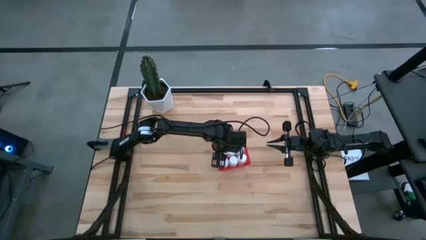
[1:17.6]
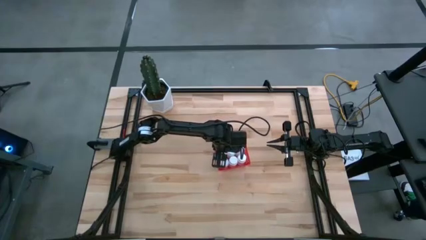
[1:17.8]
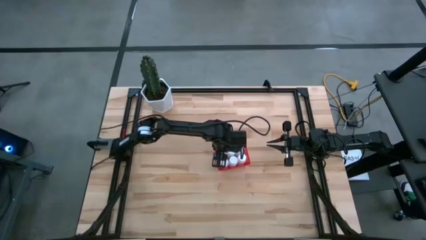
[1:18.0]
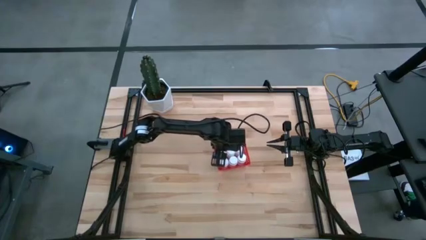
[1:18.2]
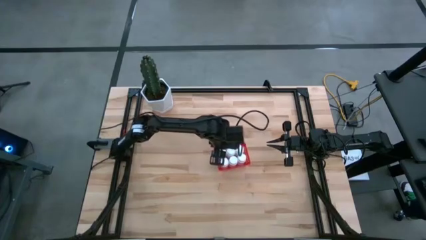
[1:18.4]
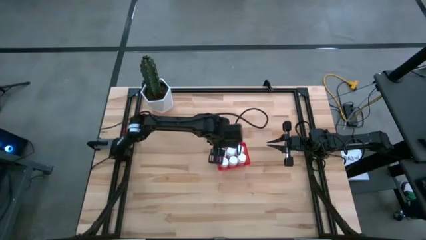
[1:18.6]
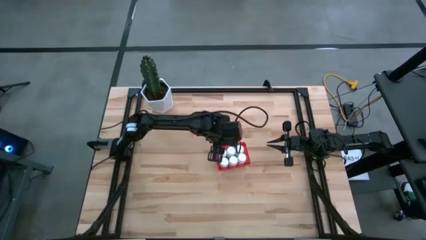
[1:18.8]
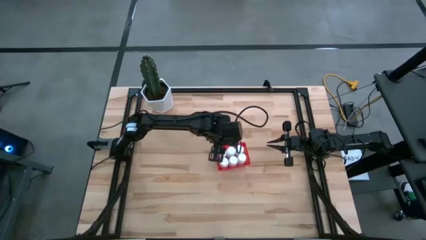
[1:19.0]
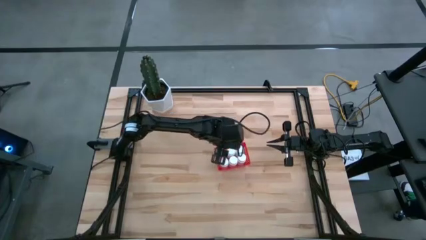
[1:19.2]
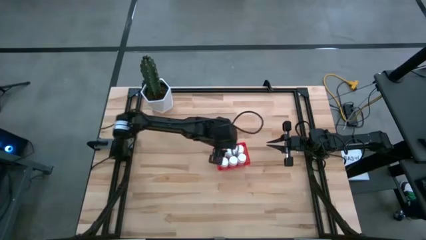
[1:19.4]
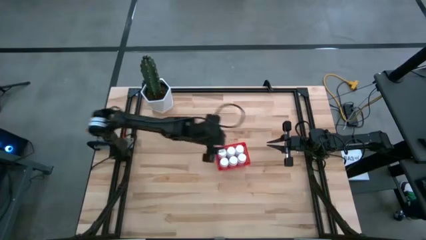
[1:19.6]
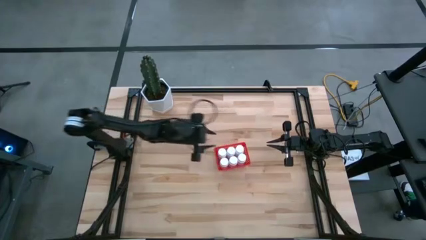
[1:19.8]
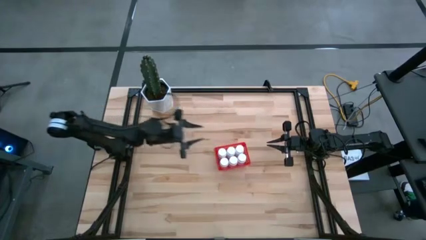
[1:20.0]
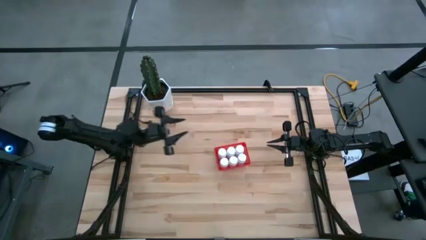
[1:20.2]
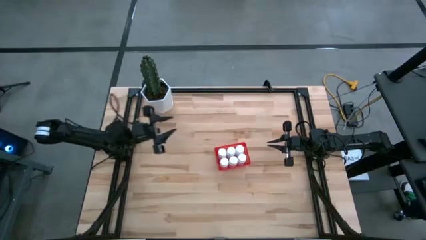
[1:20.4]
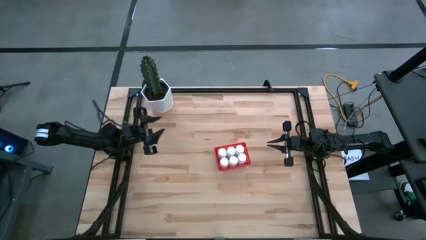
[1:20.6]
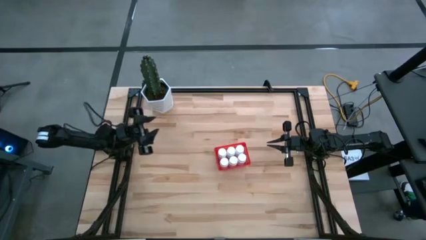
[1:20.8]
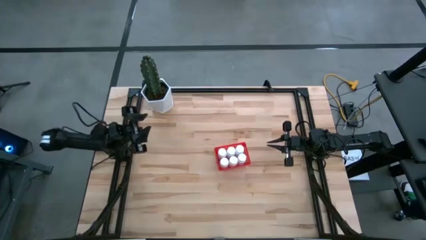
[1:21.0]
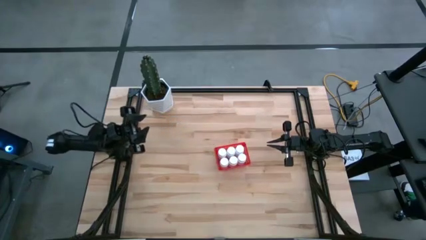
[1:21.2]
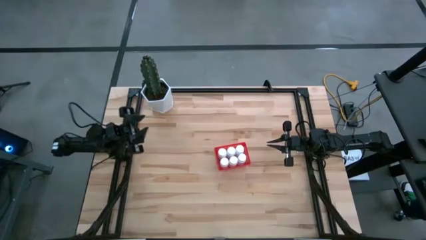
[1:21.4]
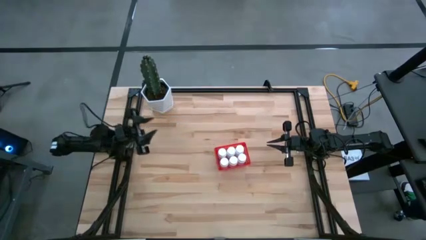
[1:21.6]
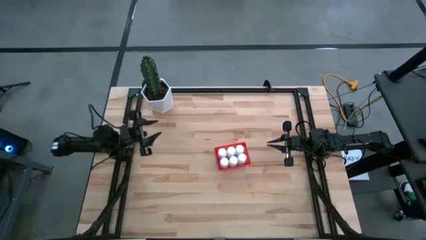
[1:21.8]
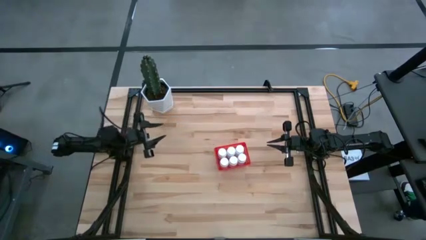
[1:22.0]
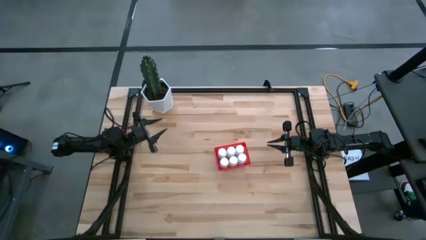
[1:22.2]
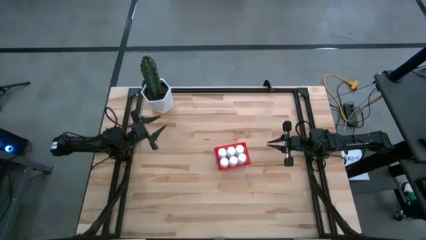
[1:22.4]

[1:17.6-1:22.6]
Task: Pick and place pill bottles into a basket
Return to Home Position

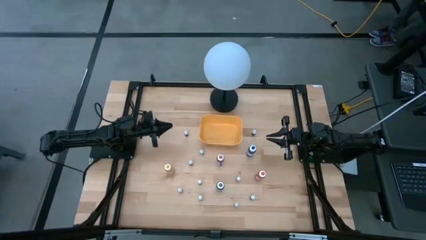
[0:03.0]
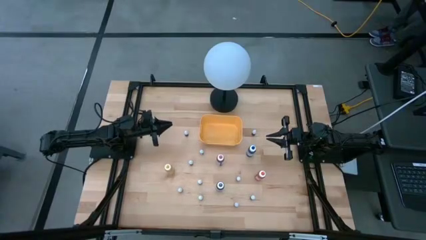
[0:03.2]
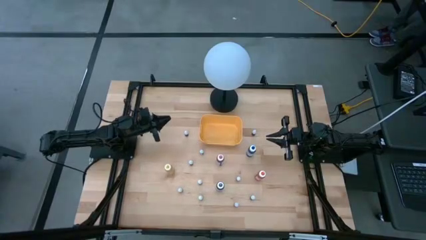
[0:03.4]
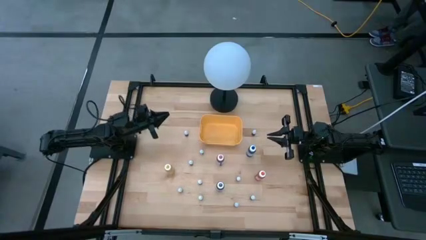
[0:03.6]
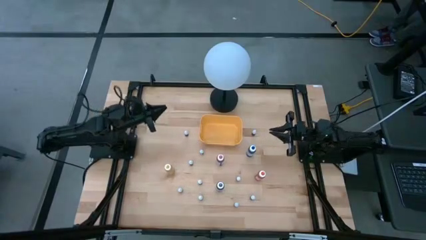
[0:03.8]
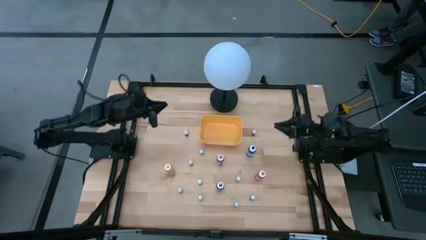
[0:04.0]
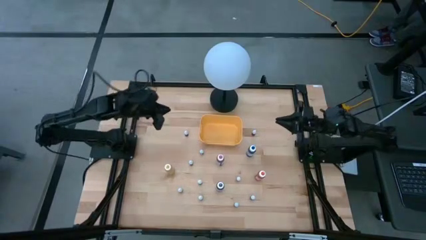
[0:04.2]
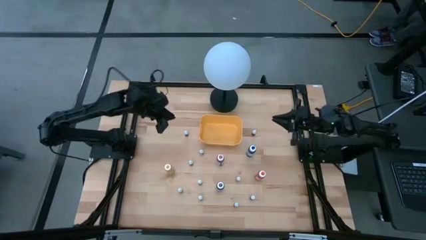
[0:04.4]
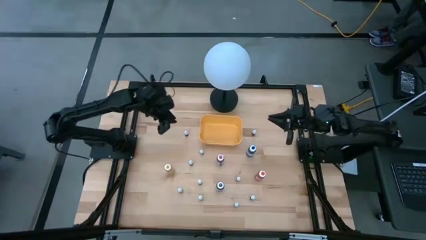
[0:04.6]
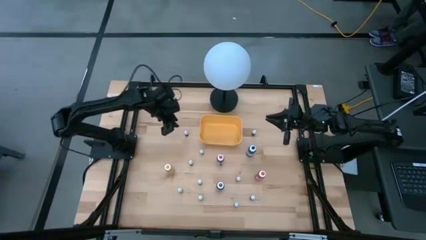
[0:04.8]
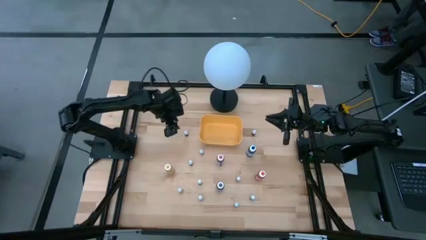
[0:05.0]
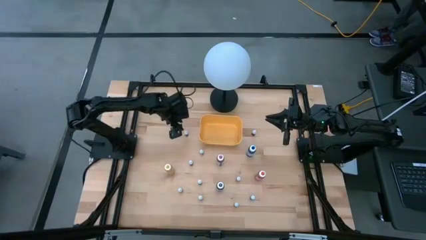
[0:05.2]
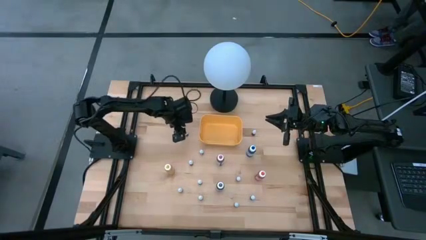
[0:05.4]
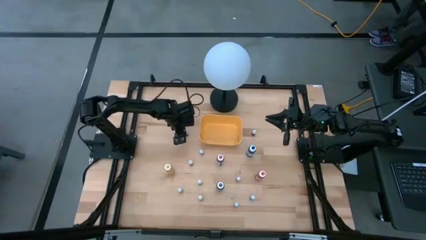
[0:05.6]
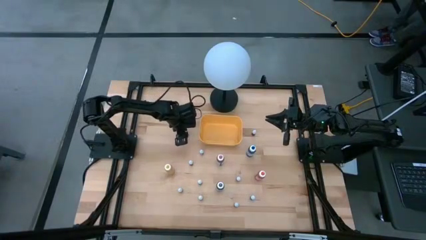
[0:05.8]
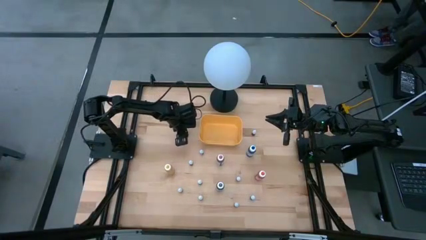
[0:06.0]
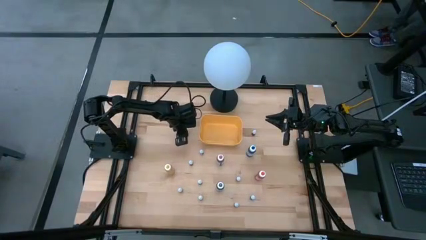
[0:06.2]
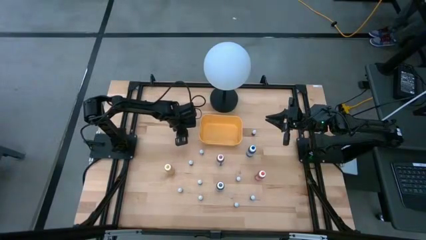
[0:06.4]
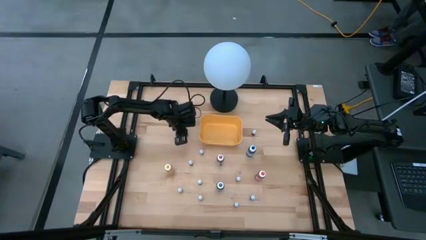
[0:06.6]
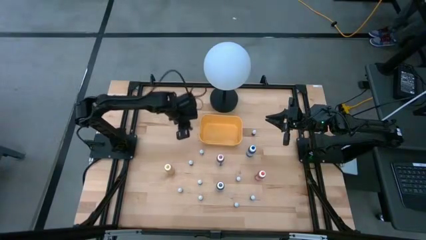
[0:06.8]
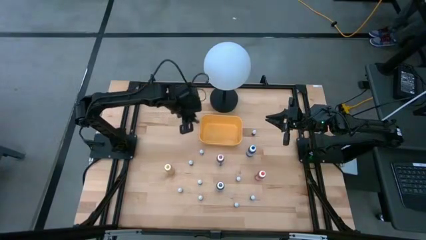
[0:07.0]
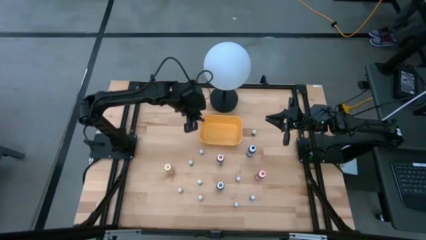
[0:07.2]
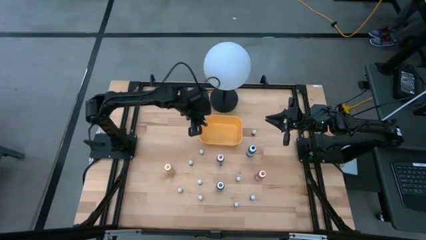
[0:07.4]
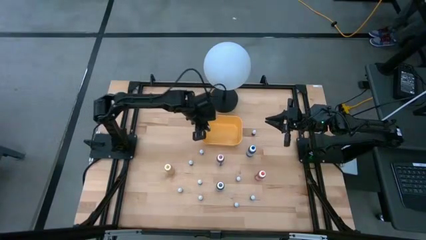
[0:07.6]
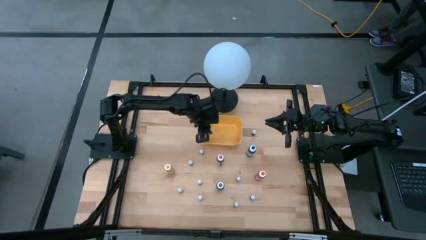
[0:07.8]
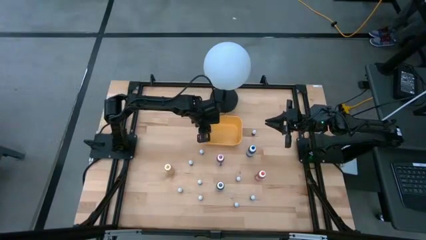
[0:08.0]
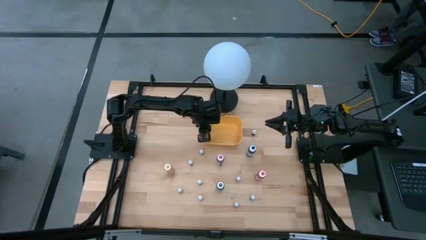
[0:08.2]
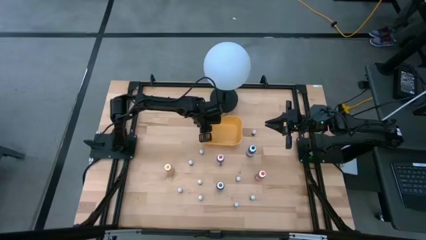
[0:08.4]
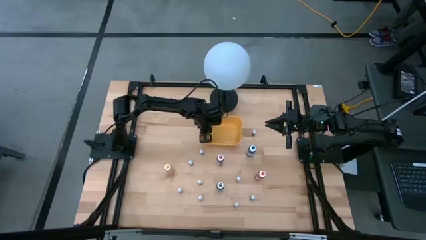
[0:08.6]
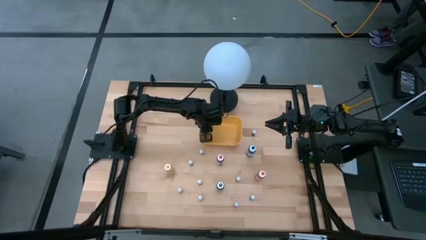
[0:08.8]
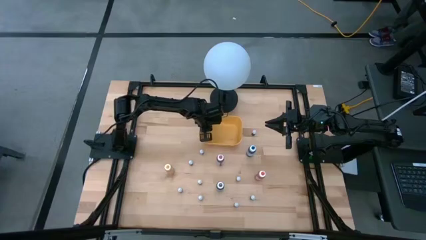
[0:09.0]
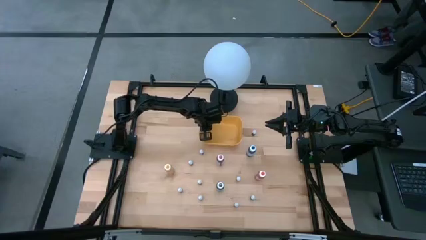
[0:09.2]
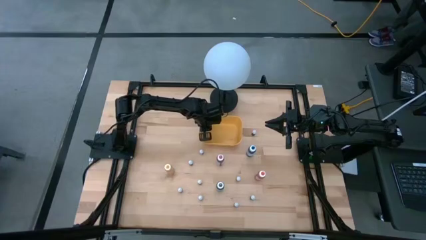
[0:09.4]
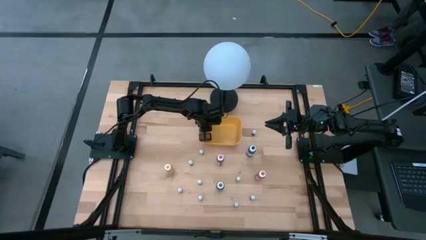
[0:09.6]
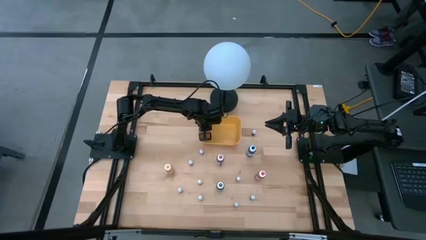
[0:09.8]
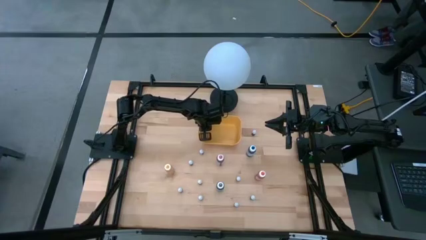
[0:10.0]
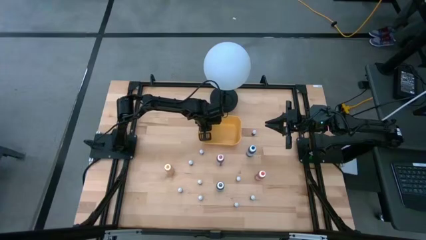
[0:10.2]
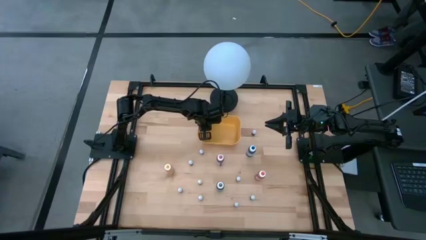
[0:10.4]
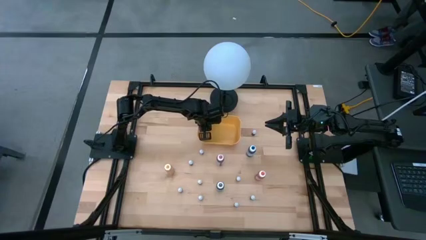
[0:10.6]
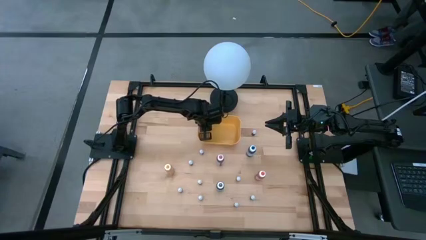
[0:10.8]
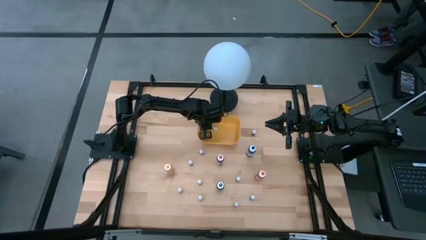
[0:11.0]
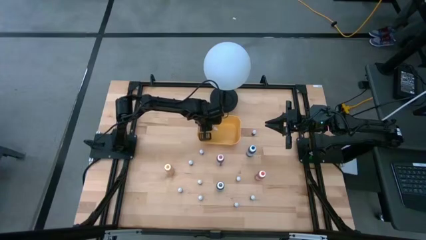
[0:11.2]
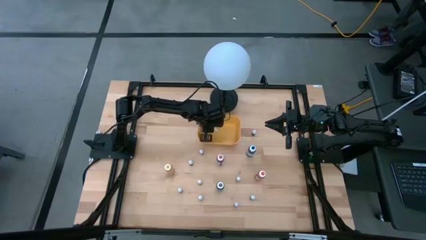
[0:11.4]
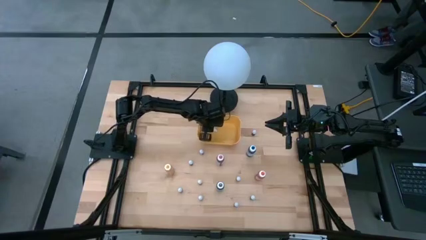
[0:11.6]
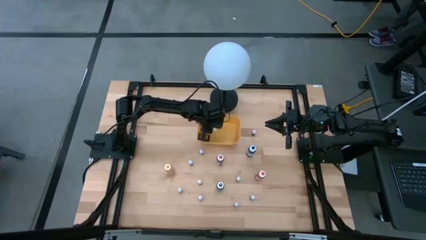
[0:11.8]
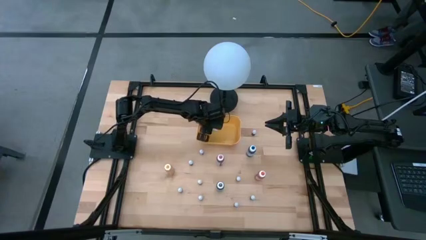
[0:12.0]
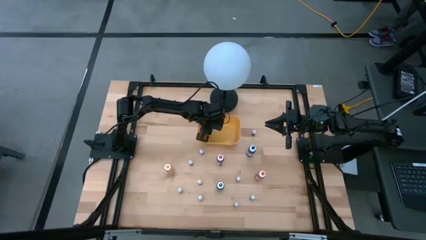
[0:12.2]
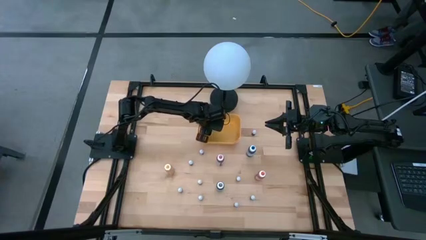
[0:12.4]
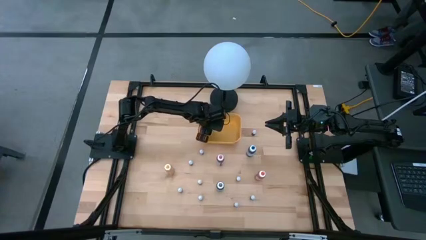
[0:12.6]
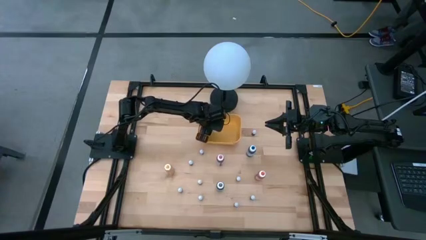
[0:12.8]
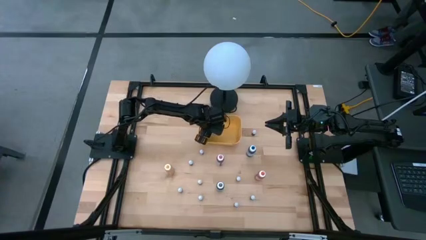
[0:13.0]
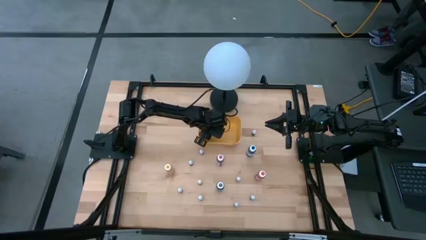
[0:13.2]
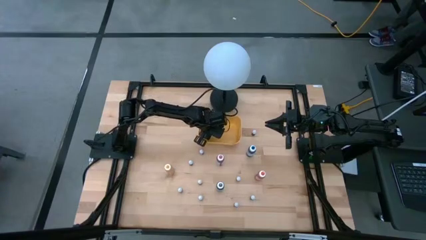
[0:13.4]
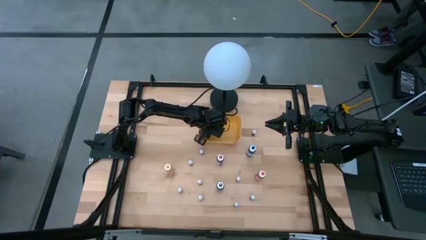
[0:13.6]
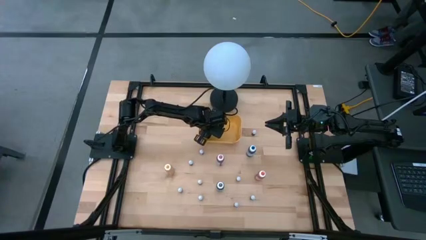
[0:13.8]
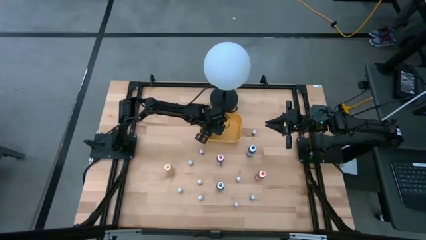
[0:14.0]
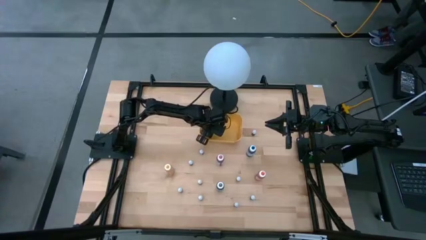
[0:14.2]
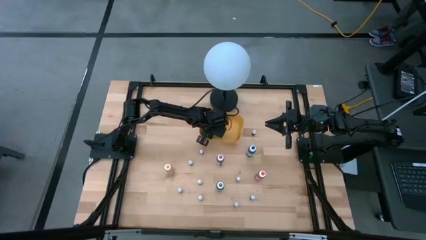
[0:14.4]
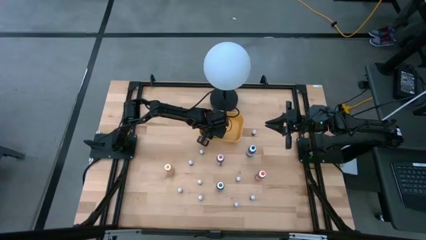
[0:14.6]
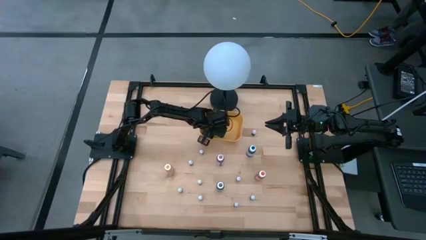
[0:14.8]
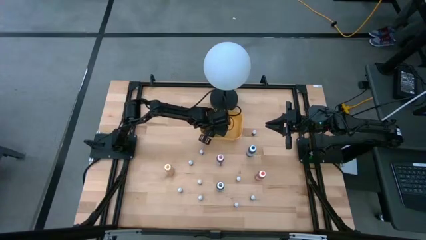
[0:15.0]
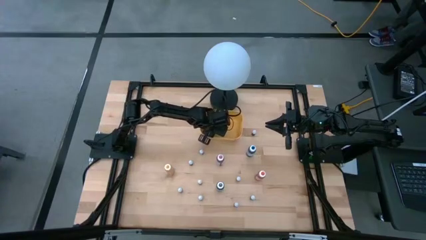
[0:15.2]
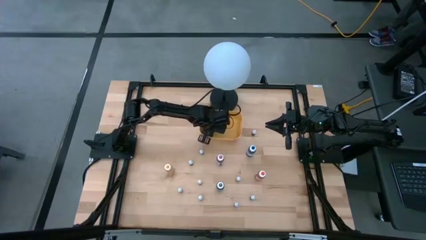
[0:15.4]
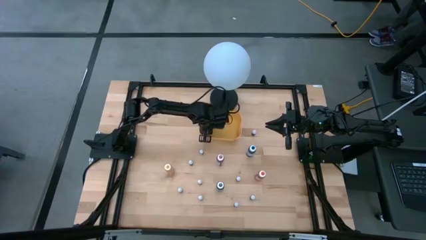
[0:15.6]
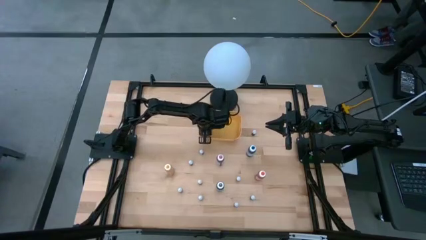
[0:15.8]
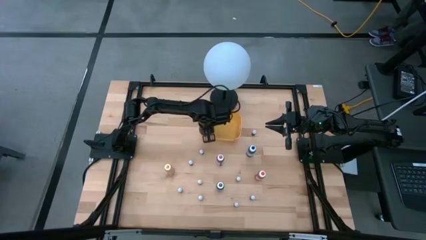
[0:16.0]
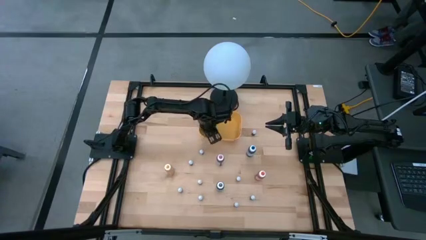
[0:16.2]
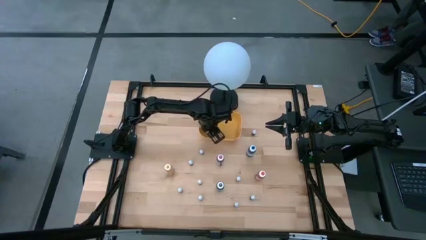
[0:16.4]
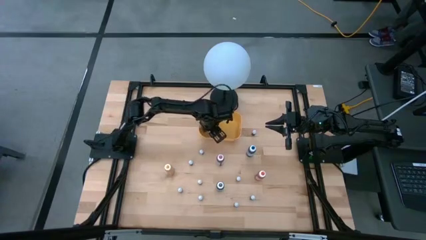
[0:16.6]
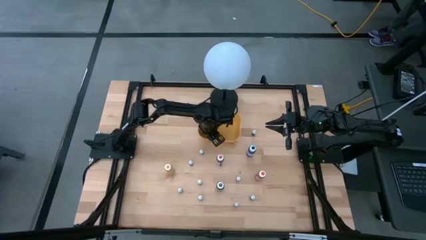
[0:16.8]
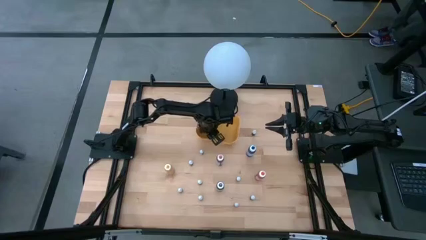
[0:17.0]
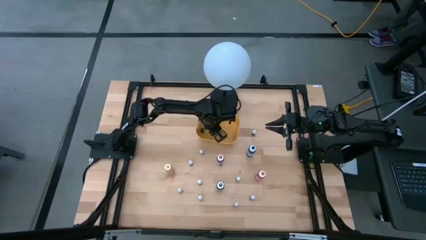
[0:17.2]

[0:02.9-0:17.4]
Task: Pick & Place food coloring
Put the left small light blue food coloring bottle into the yellow bin
